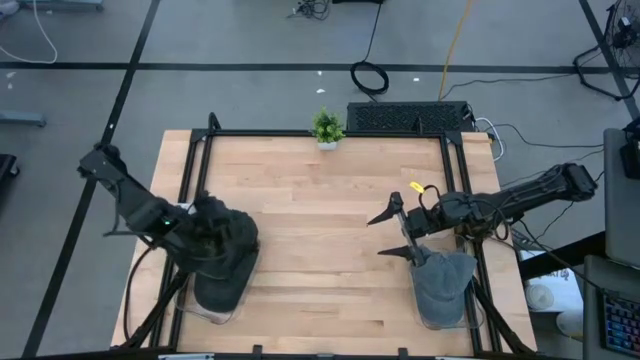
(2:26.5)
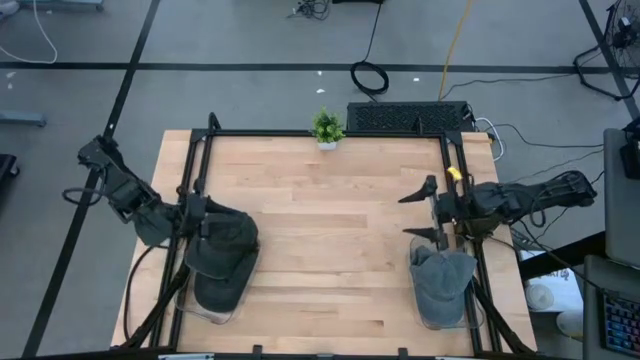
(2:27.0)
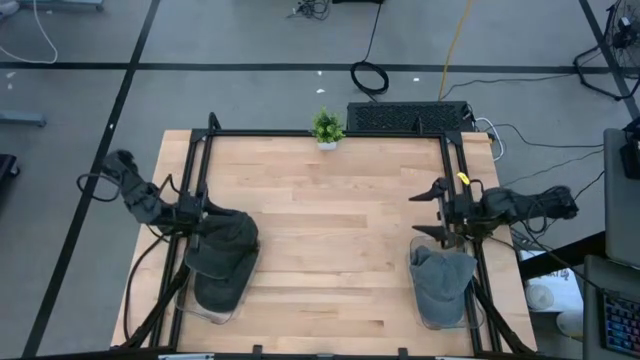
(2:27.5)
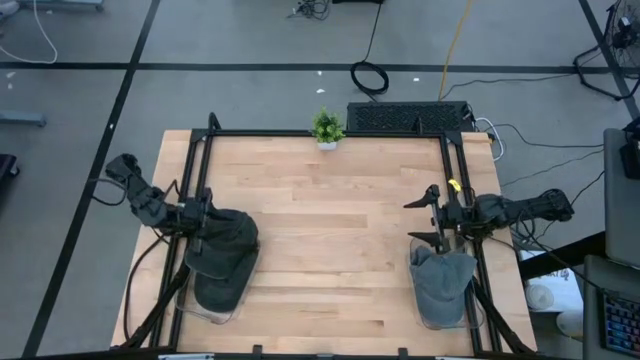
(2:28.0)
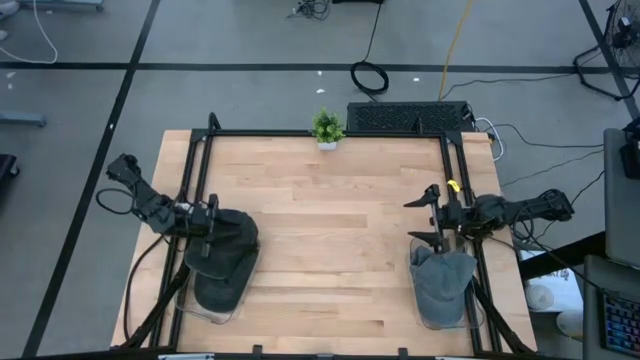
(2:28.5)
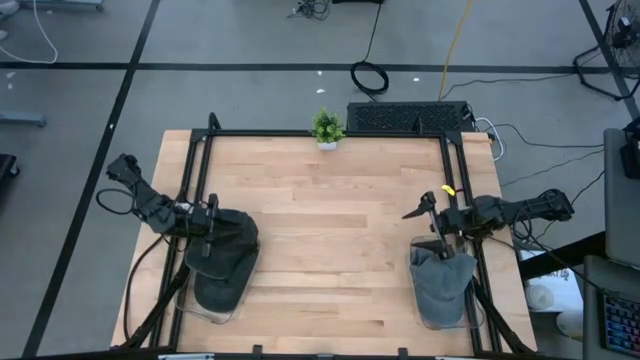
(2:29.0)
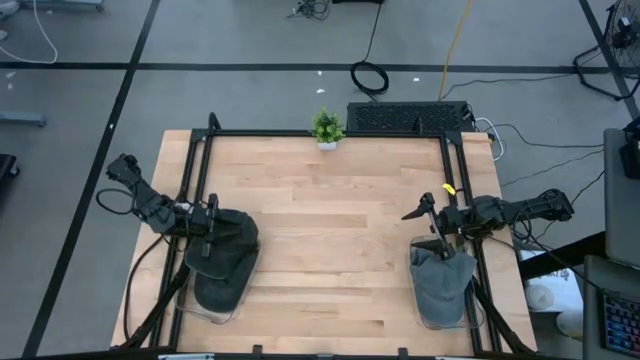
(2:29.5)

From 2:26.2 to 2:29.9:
Task: Pick & Place hat
Return to Home Position

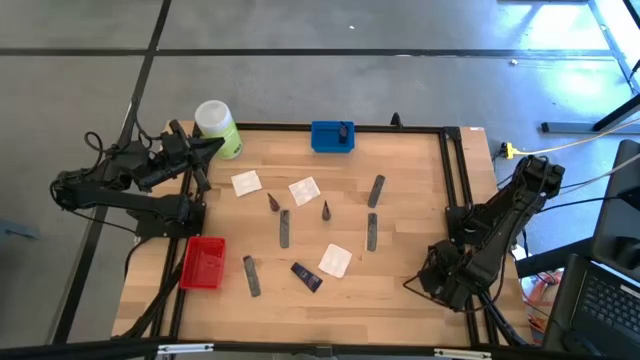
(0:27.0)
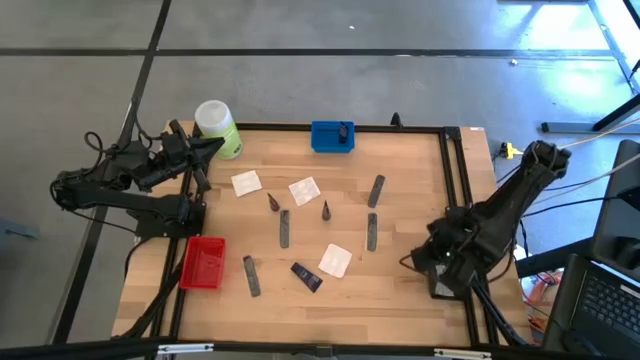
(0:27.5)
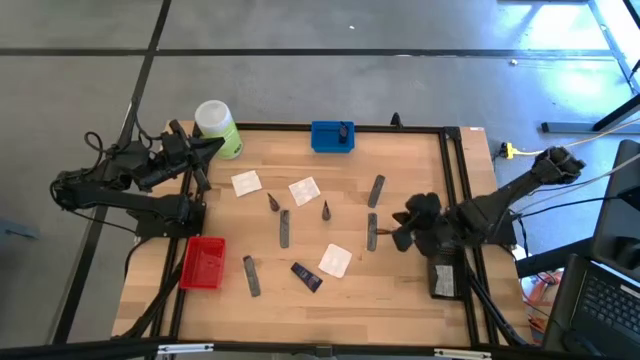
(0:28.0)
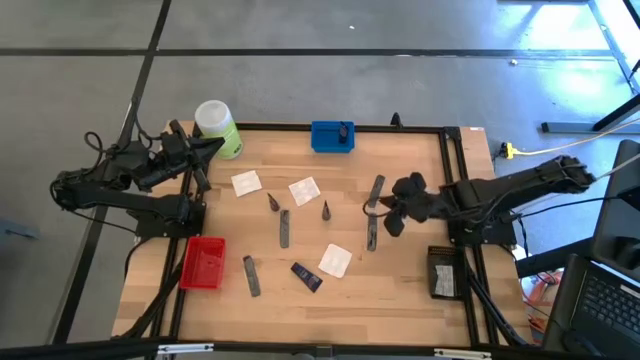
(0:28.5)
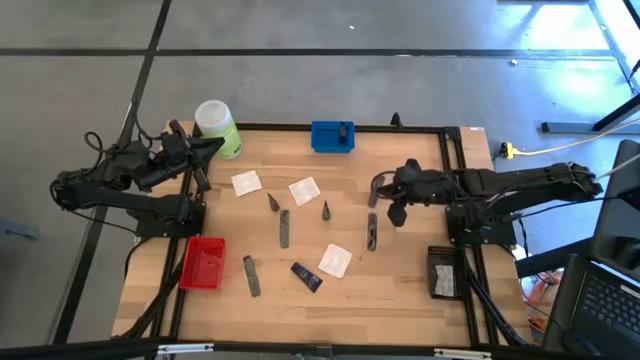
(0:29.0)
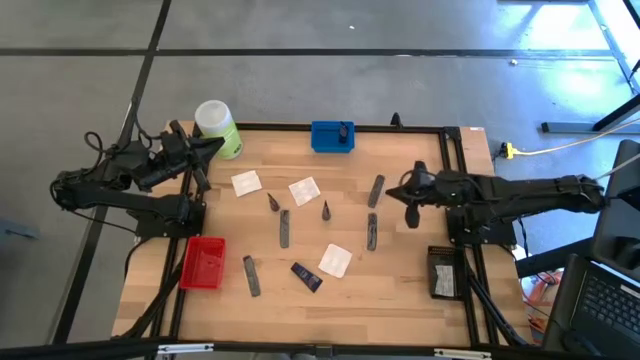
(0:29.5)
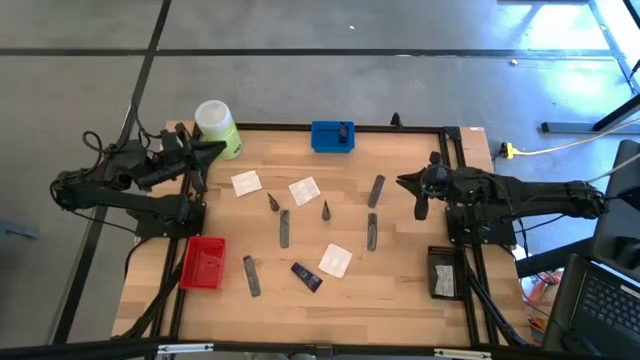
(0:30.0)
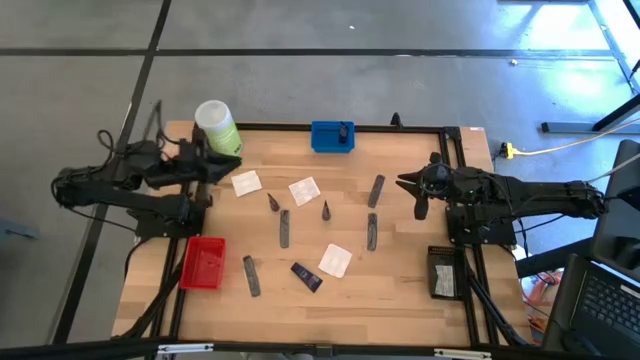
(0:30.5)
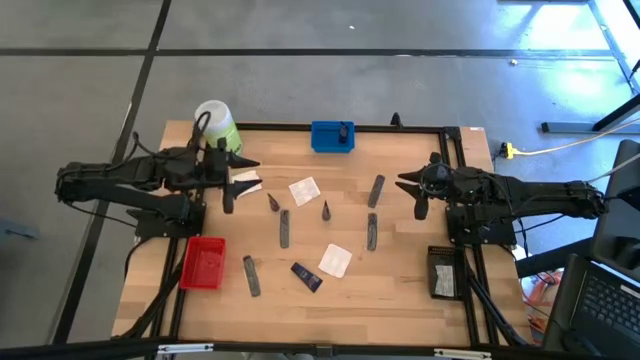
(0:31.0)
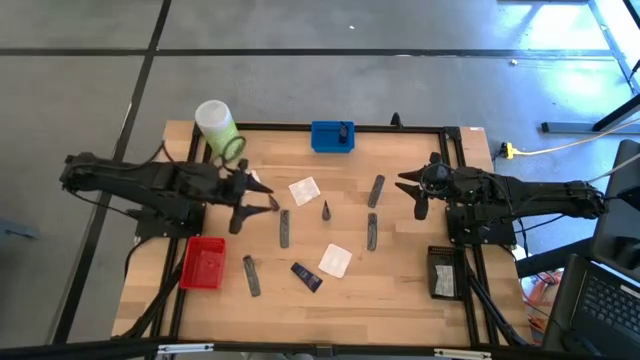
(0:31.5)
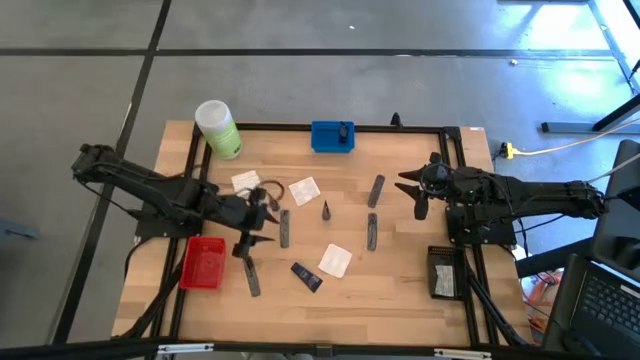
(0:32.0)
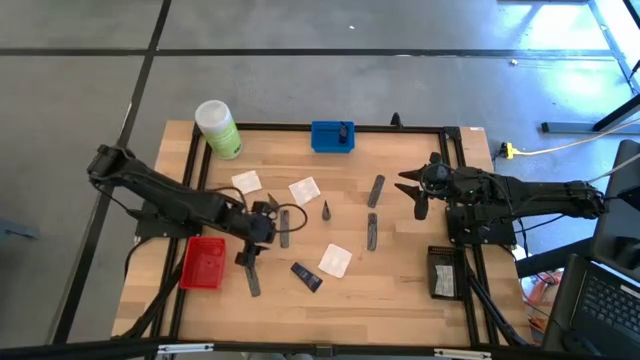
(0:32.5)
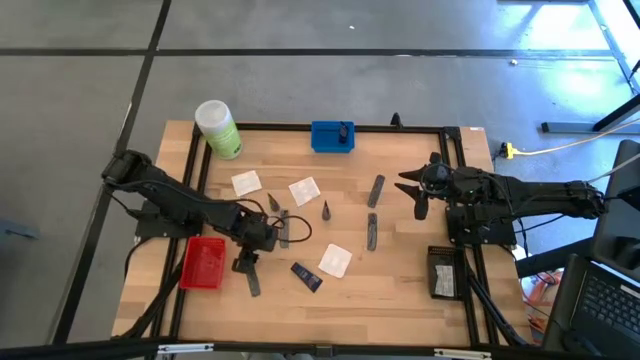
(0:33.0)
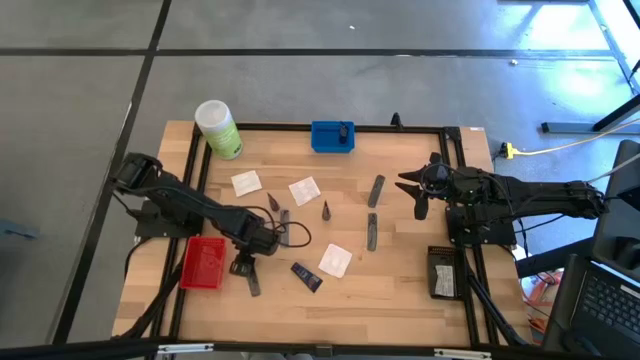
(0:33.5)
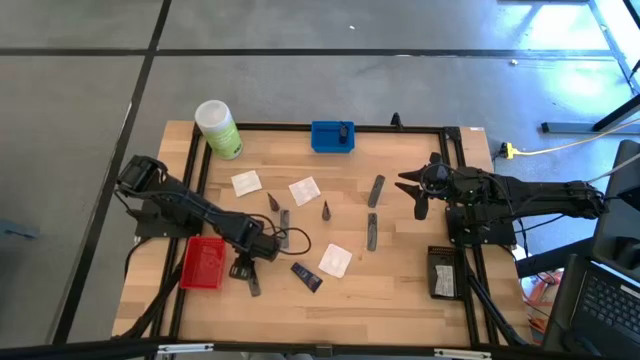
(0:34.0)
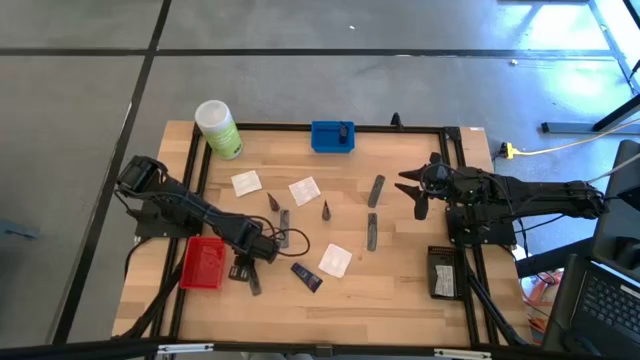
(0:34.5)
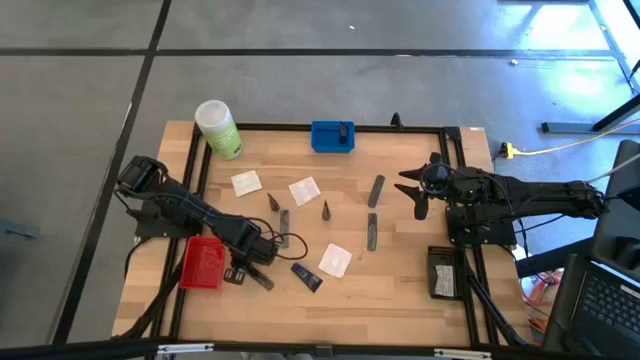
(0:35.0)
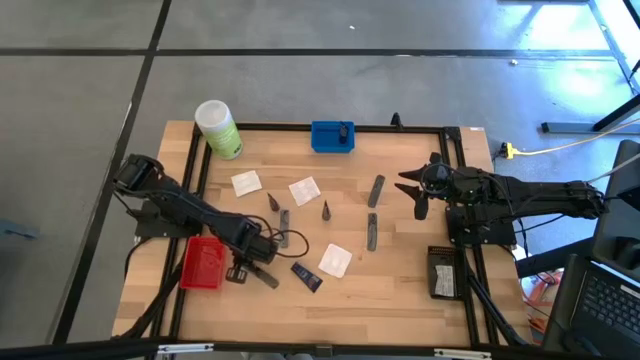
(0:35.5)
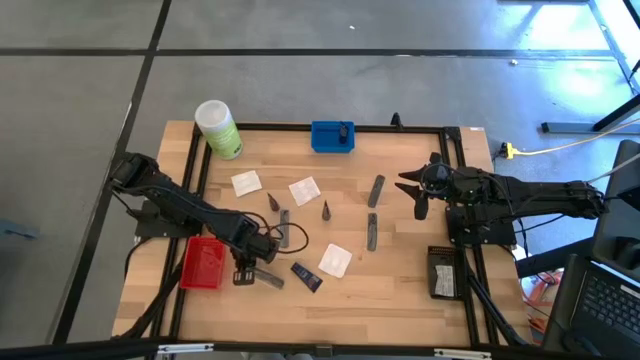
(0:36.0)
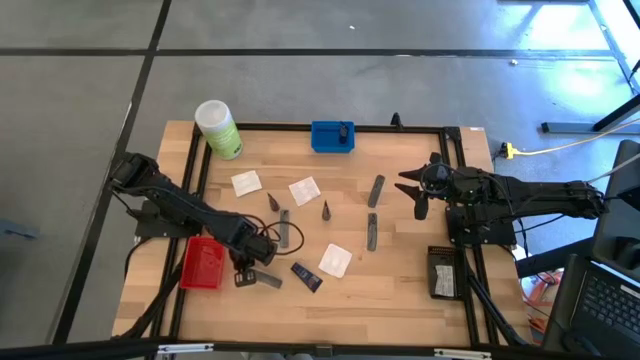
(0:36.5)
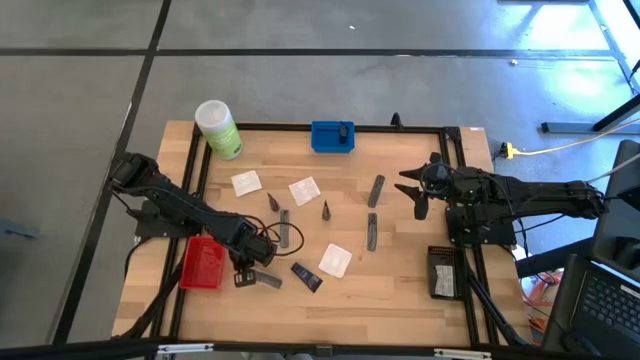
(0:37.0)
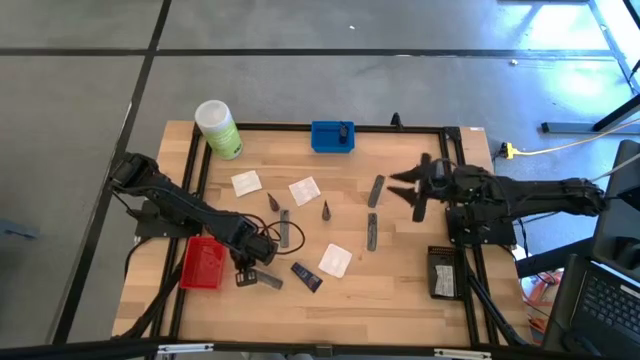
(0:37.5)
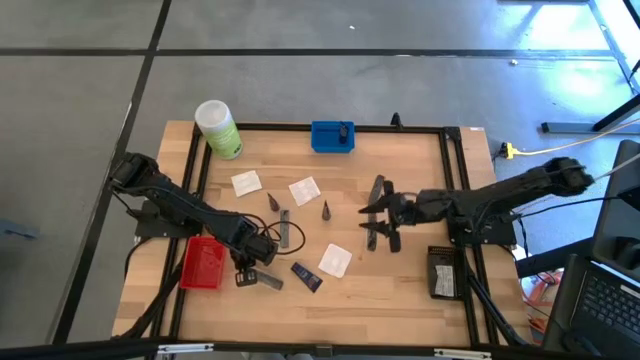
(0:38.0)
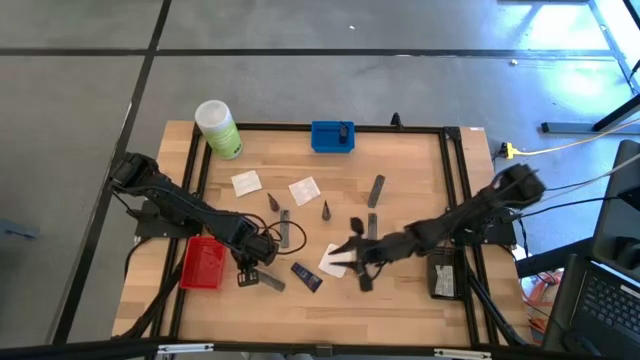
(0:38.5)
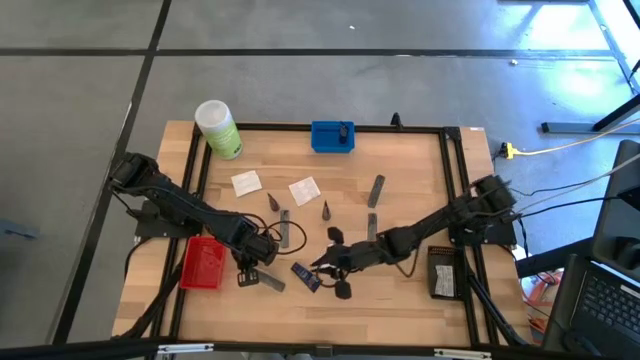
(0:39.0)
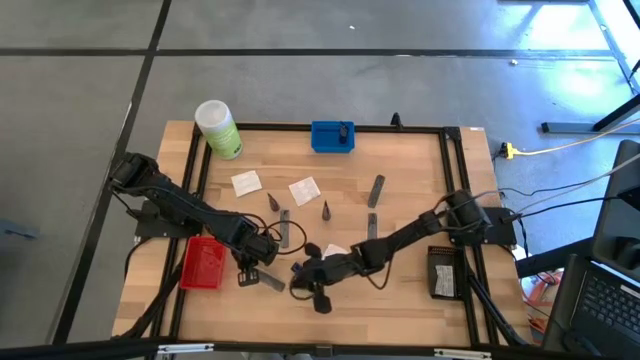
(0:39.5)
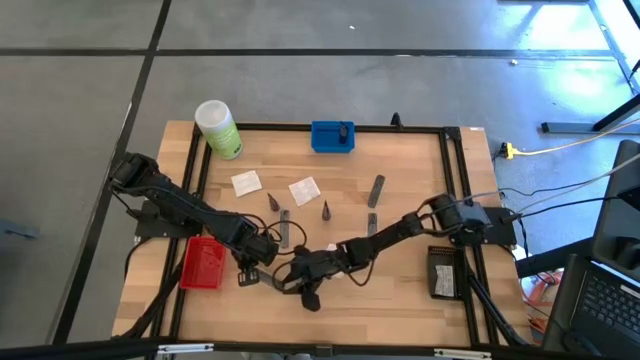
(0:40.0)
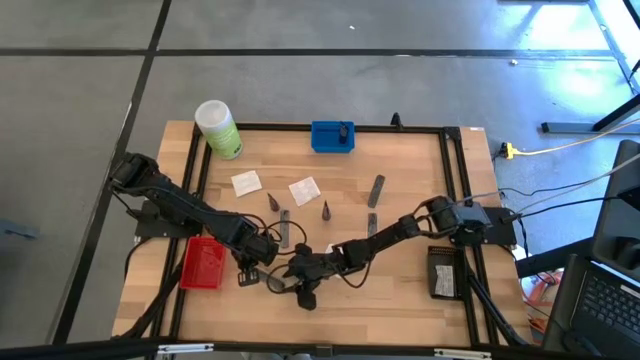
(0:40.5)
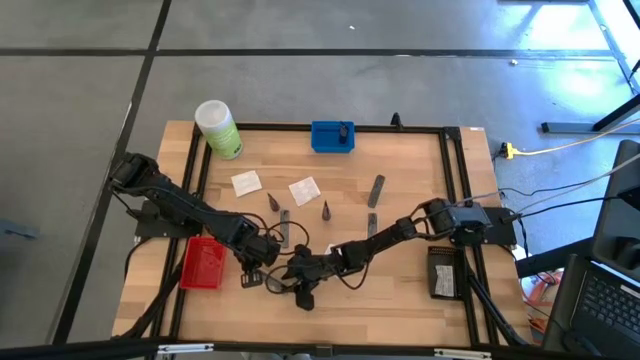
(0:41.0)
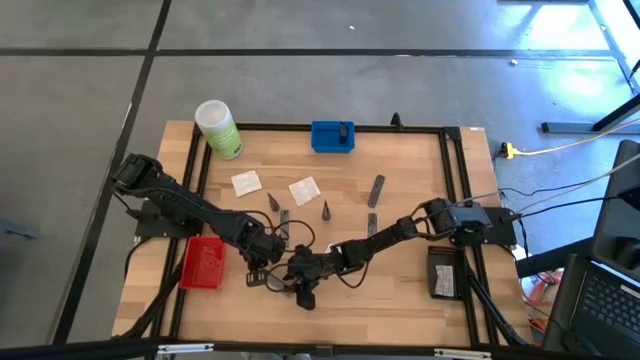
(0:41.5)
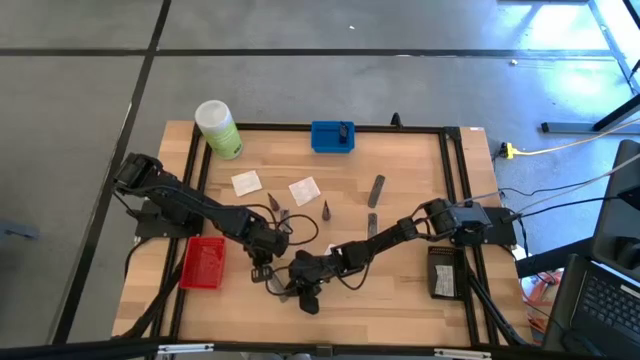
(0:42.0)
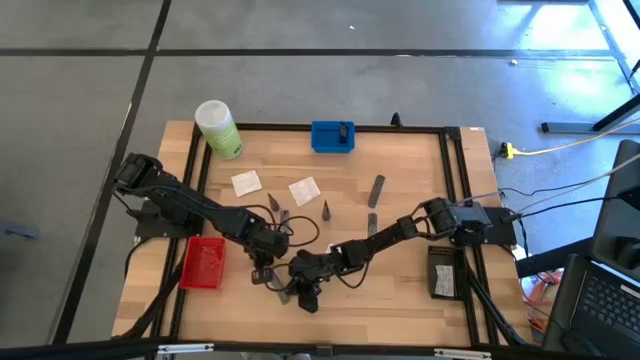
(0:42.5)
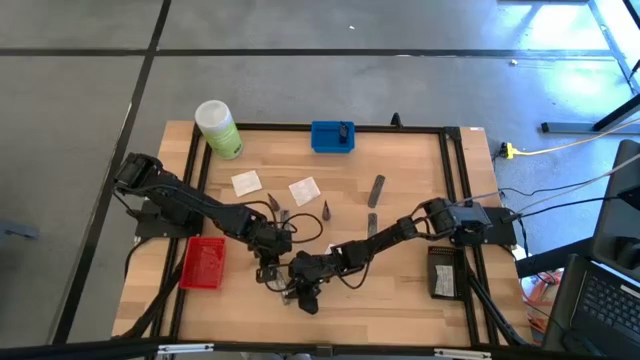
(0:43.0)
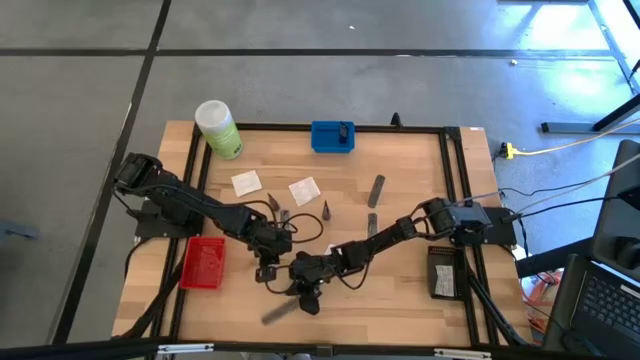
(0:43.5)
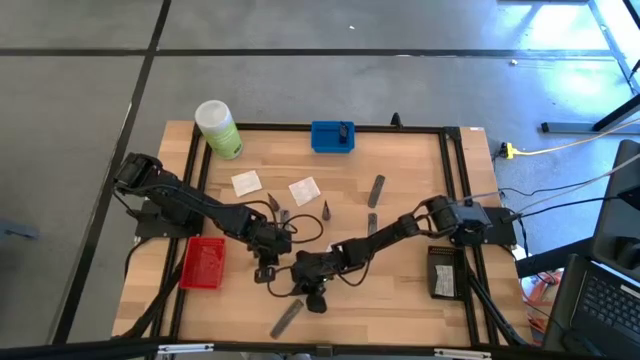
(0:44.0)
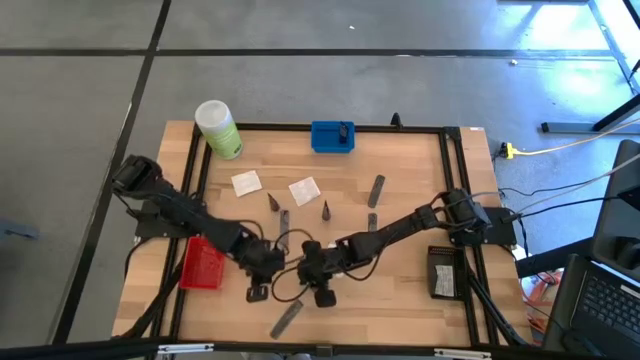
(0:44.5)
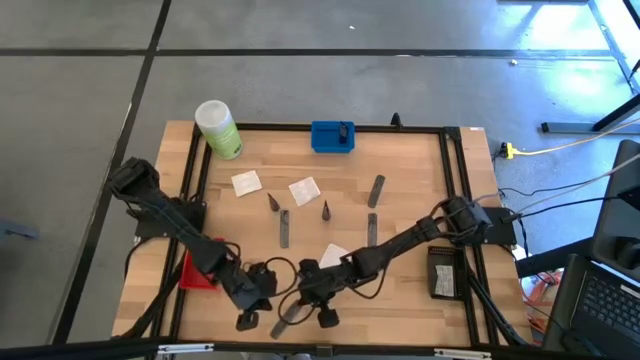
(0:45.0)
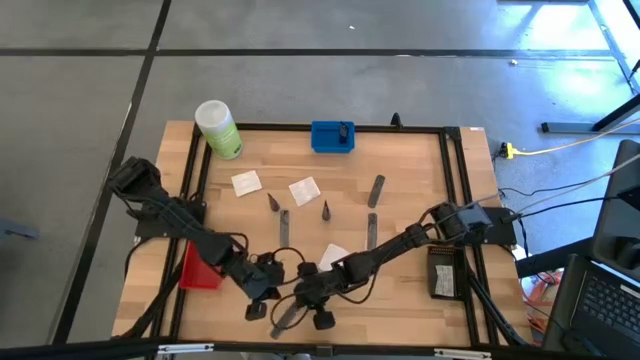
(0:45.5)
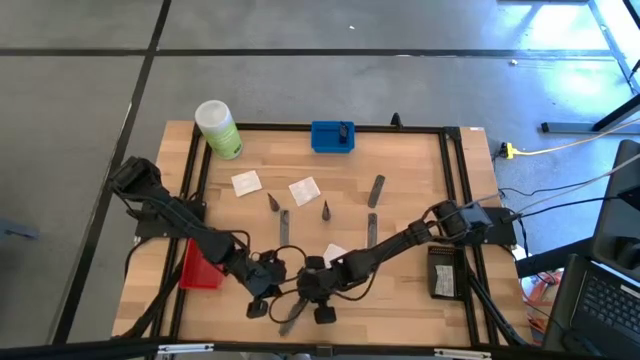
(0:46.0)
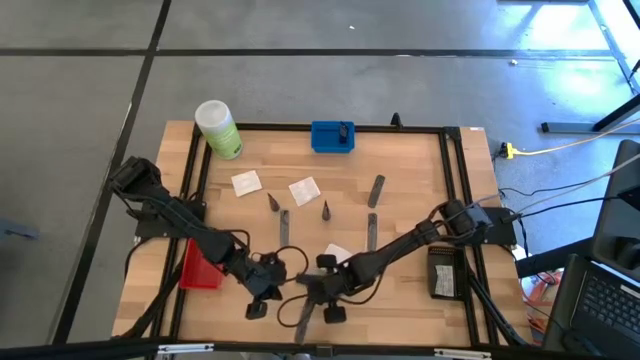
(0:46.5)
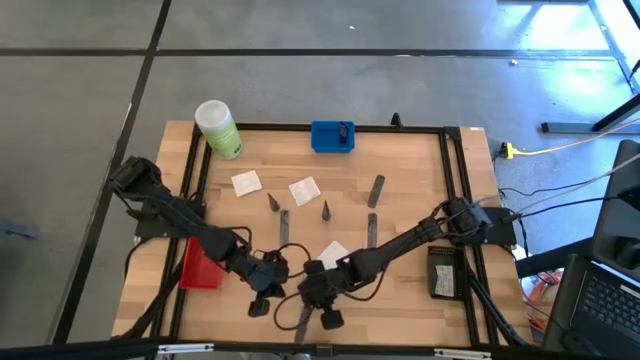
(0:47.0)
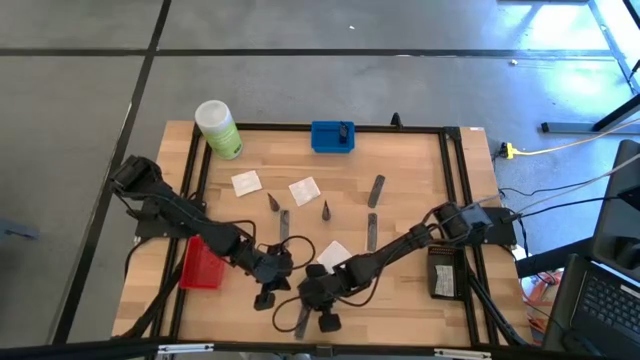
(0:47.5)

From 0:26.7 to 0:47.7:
Task: Pick & Place Travel size toiletries
Put the black hair comb into the red basket
